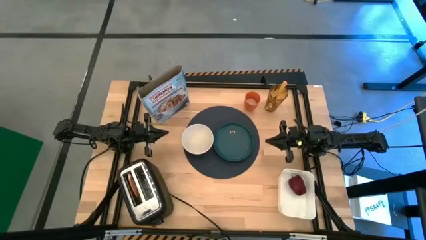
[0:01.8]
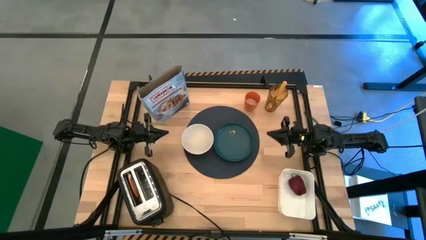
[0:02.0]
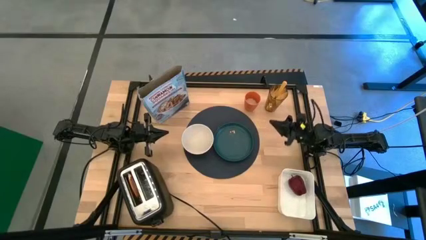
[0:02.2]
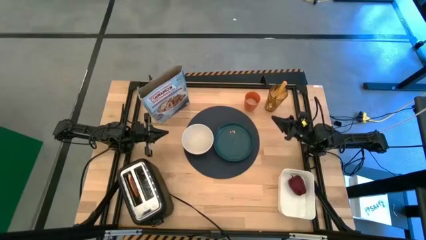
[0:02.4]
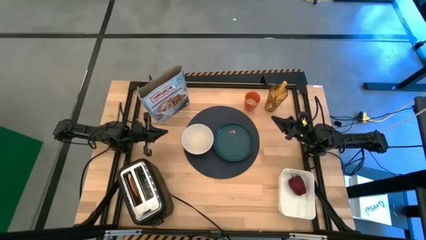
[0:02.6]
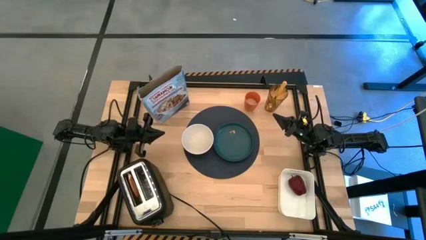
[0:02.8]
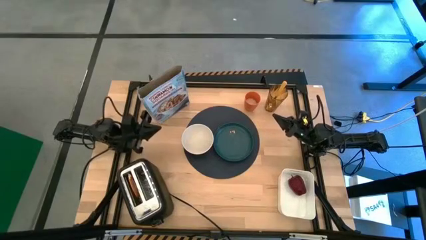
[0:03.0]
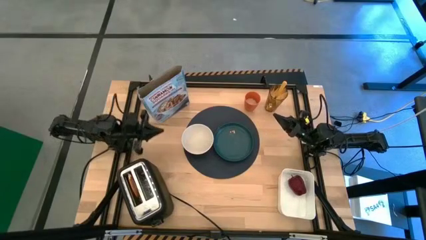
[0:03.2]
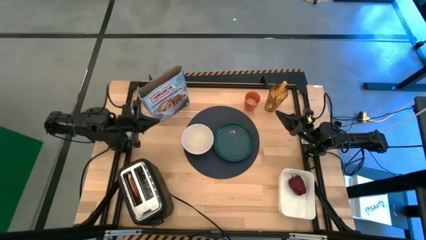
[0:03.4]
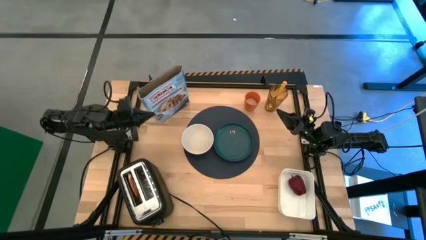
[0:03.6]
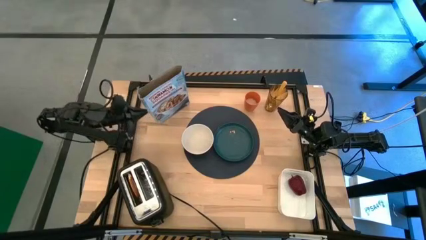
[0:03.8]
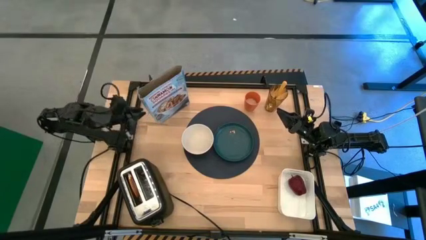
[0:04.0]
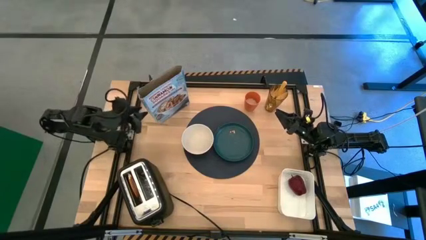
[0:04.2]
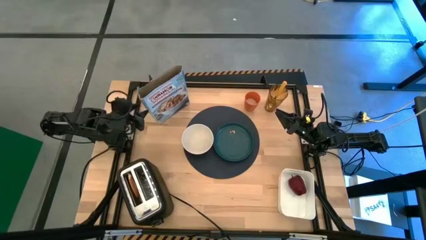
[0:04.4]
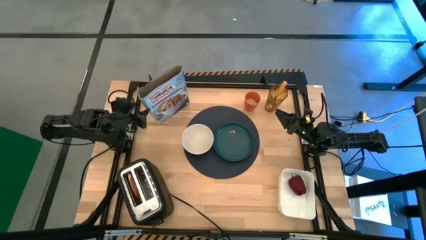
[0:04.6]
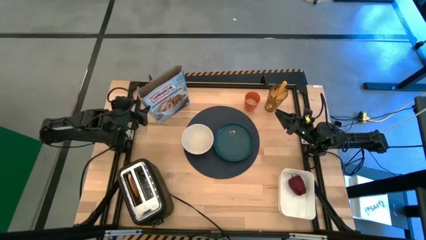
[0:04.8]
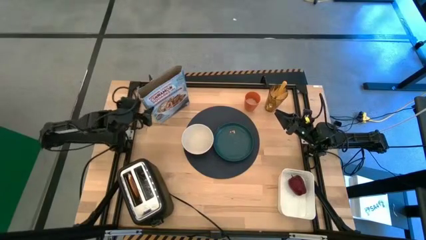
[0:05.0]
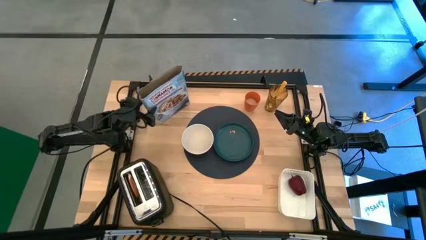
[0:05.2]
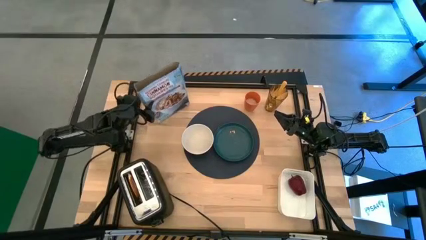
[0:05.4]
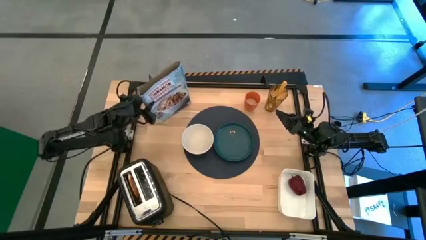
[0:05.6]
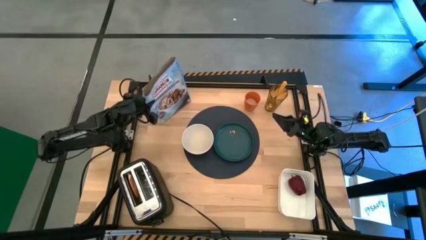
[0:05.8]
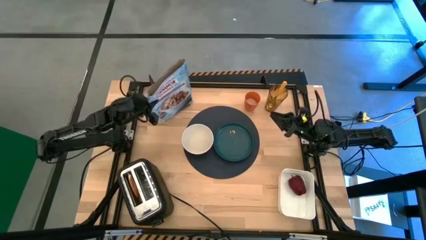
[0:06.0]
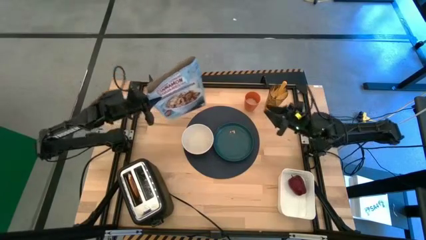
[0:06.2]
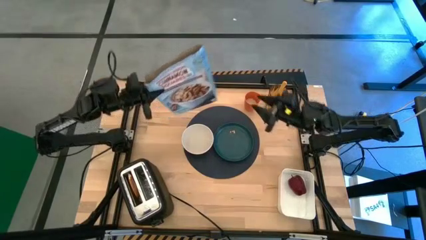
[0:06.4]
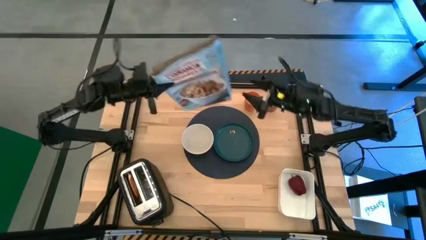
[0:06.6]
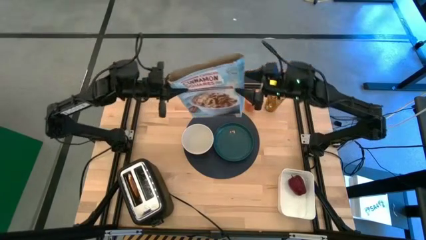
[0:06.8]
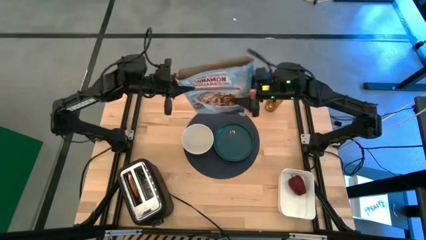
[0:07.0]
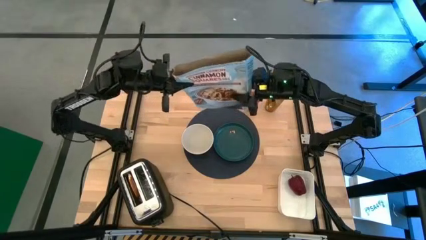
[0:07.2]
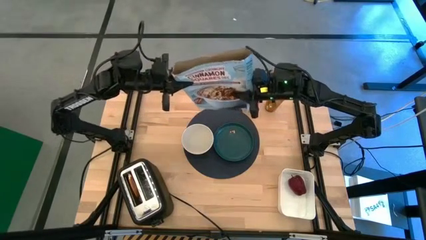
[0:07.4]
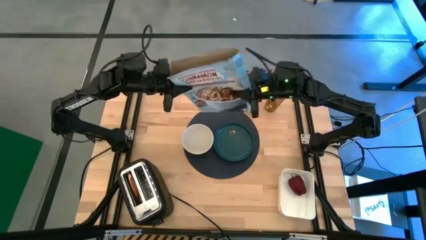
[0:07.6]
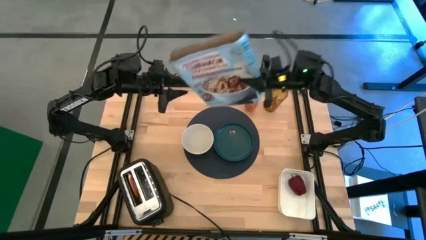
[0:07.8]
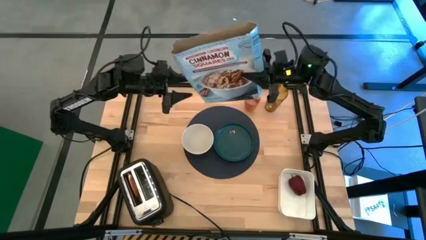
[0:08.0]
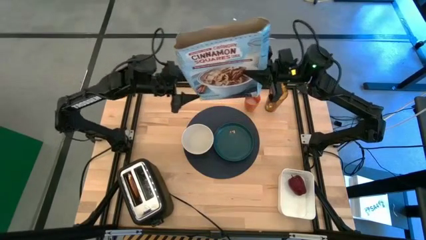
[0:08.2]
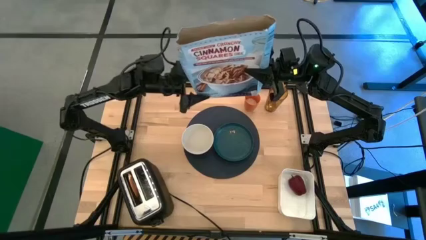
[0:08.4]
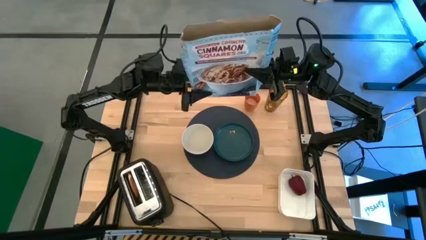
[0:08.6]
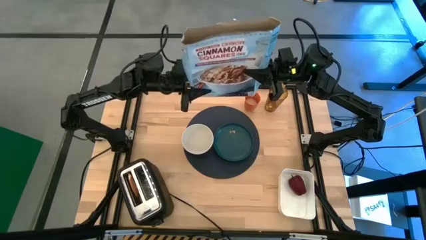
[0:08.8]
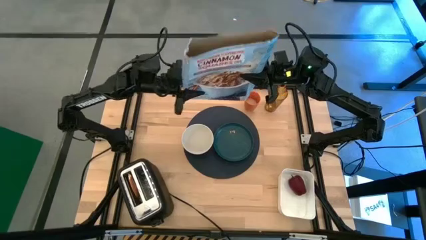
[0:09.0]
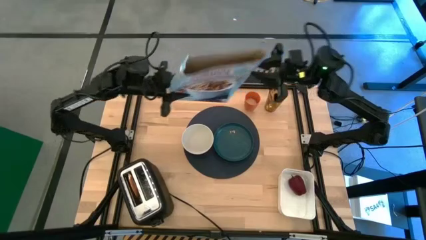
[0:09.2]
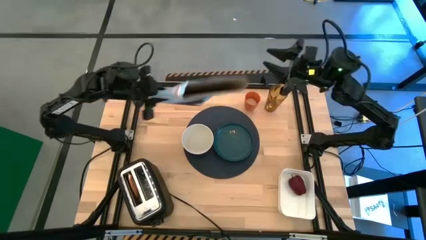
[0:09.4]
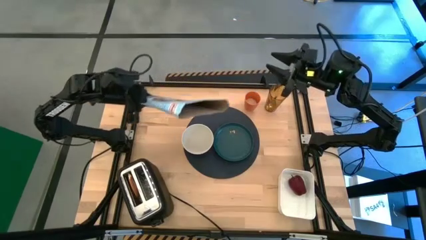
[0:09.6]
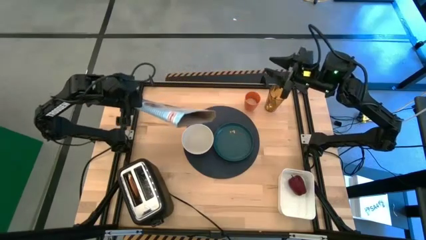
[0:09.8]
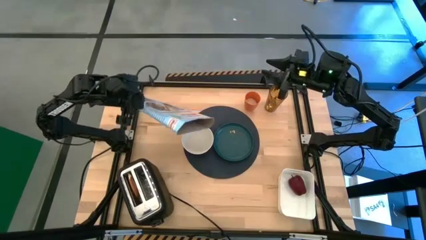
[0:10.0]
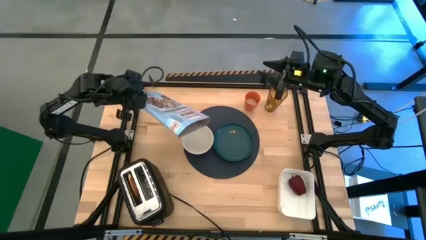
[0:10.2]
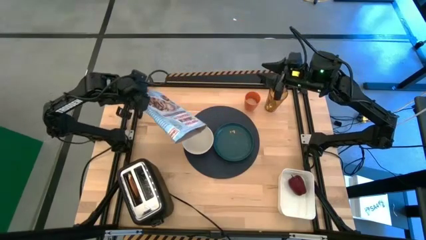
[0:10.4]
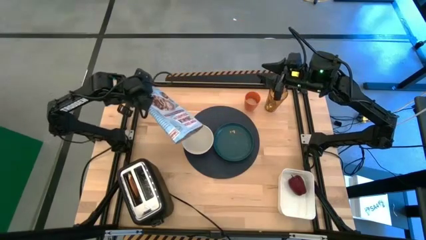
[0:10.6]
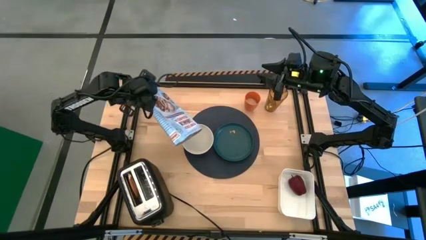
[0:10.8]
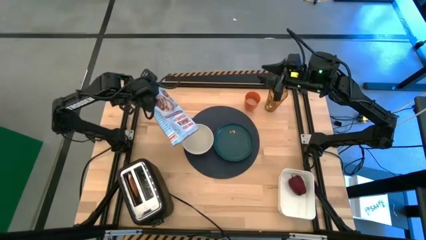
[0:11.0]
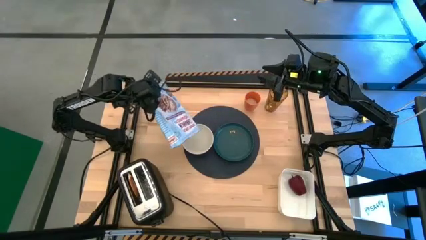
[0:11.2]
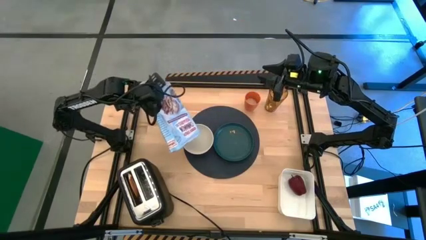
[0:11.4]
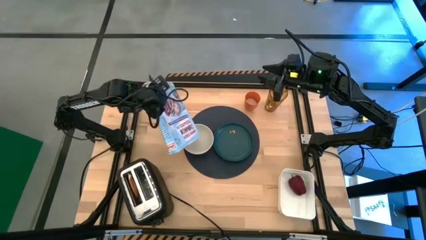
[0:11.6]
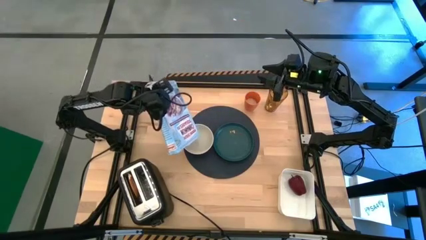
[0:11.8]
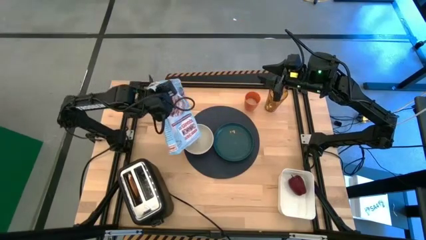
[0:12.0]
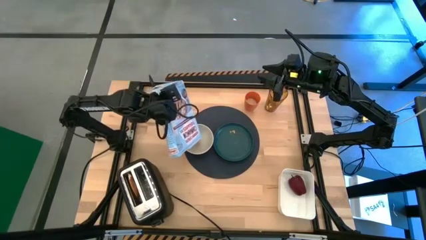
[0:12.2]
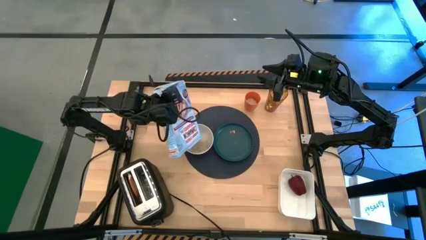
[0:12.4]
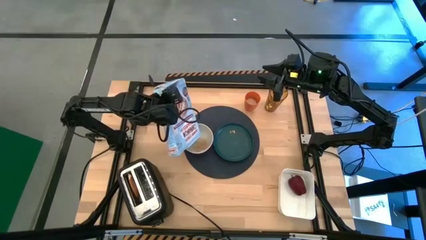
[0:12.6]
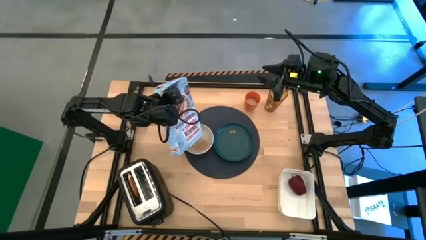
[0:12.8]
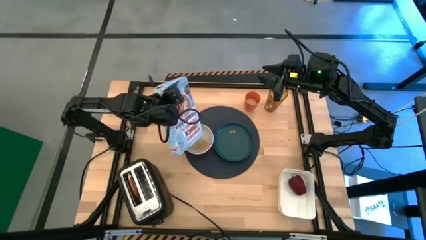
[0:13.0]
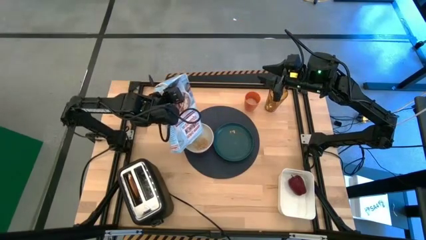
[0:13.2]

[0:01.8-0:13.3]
Task: Arrange a breakfast setting
Pour the cereals from the blue cereal box into the white bowl on the blue table mat
